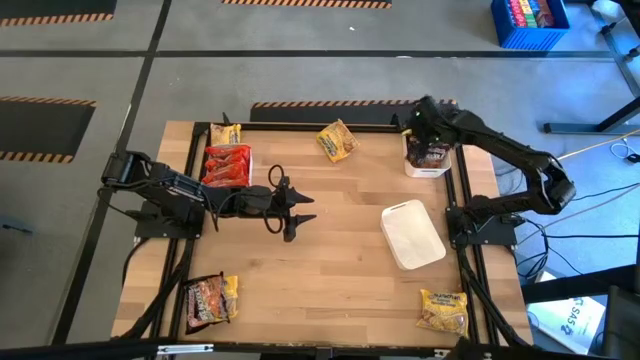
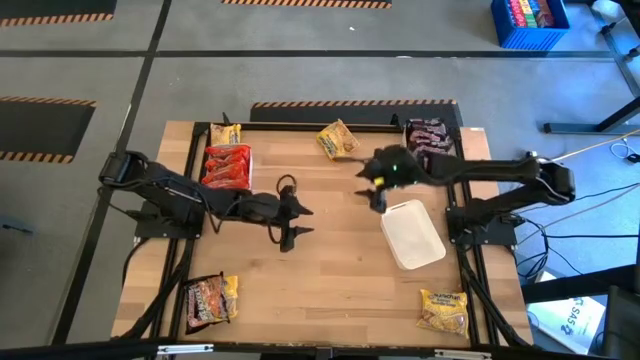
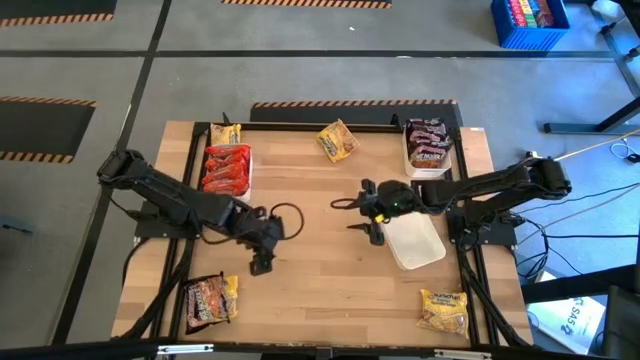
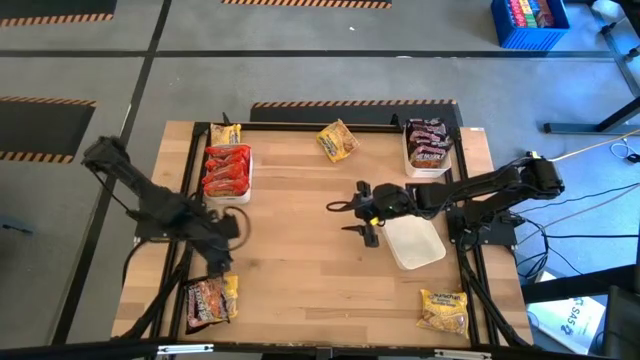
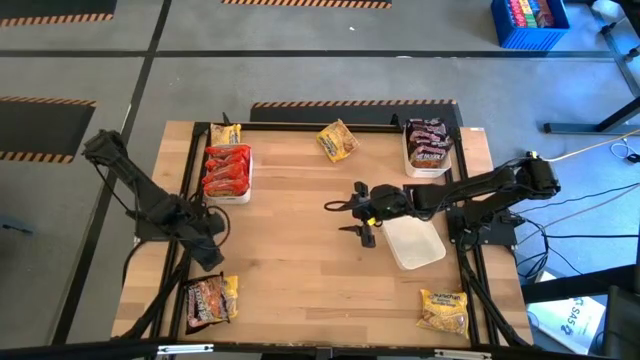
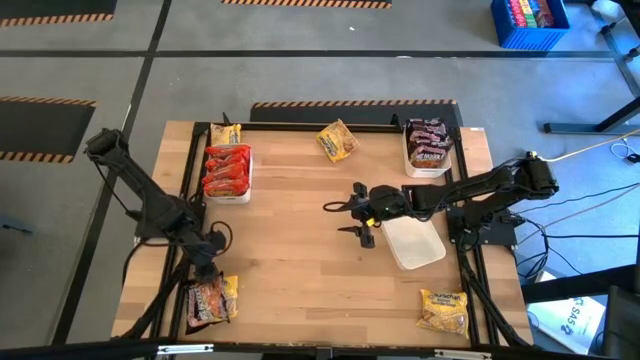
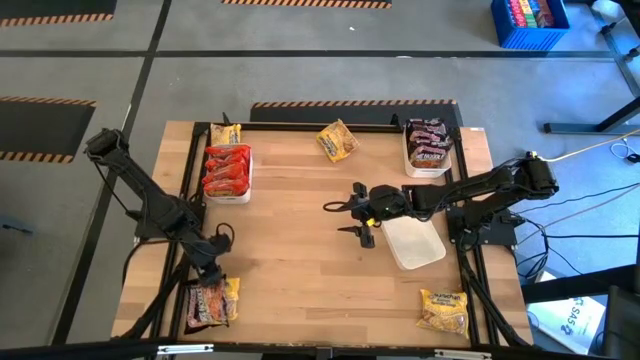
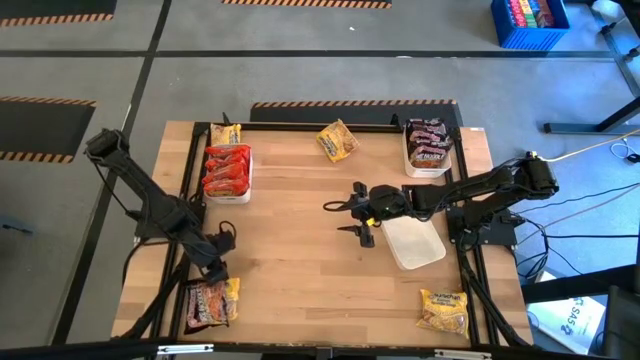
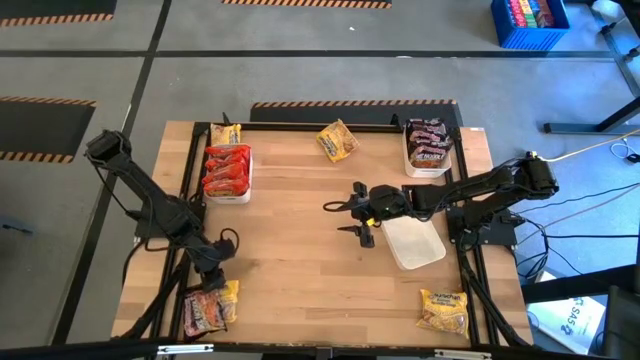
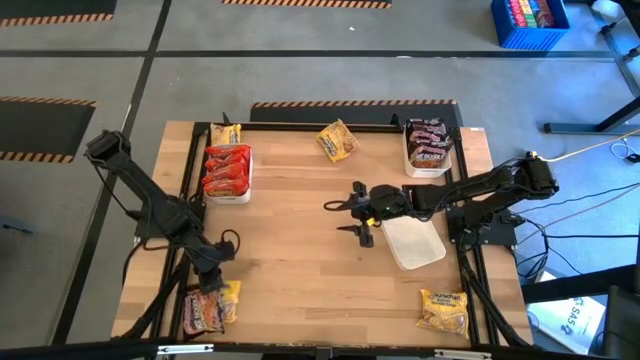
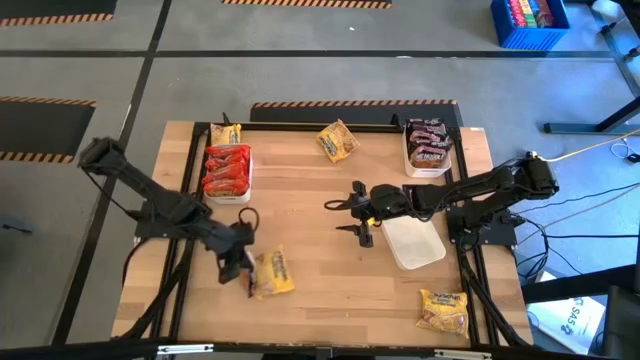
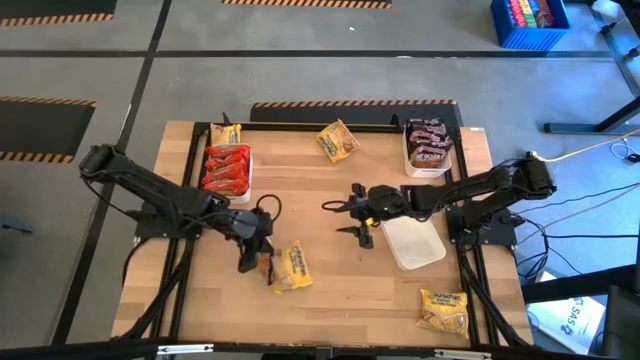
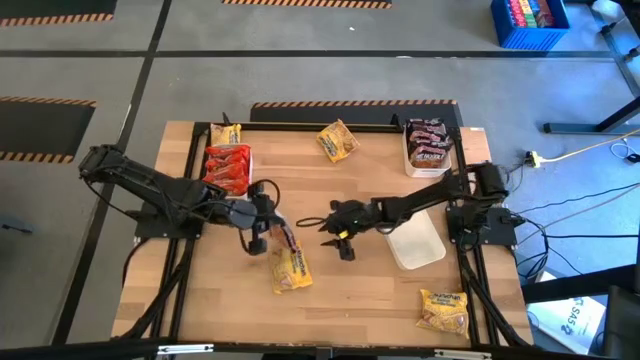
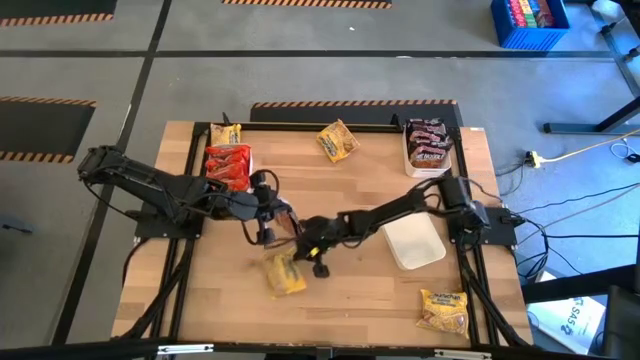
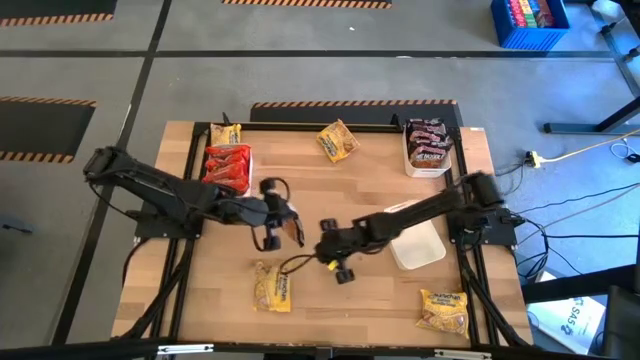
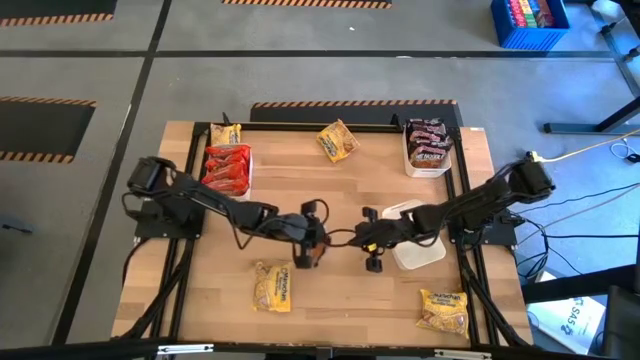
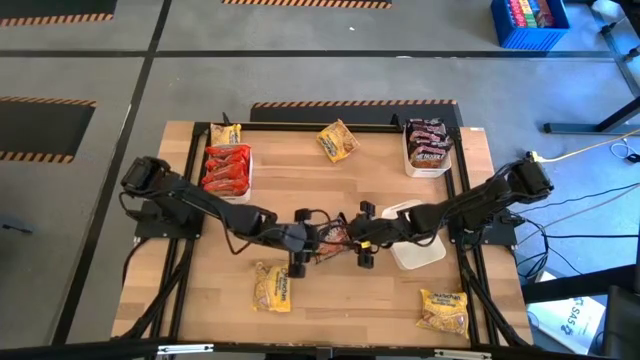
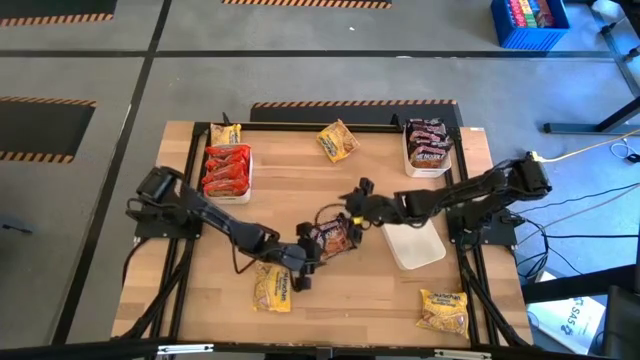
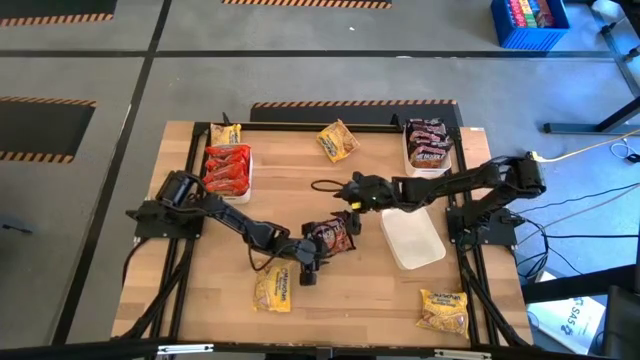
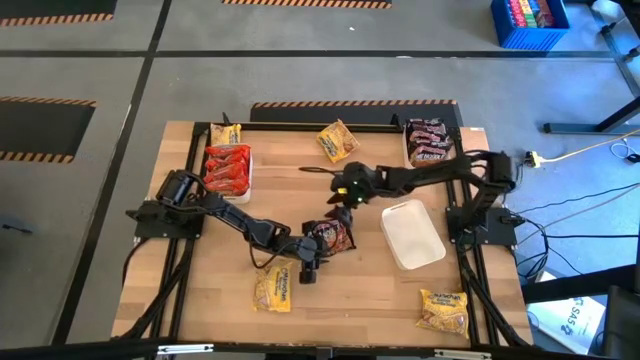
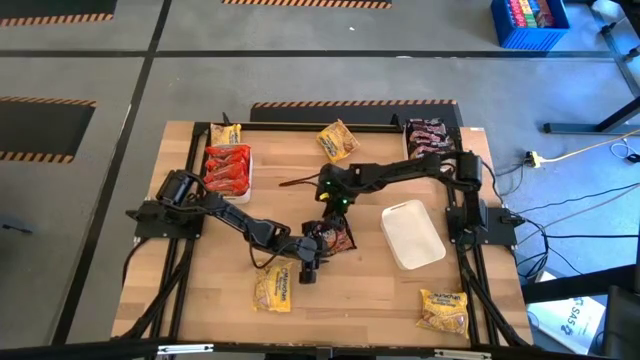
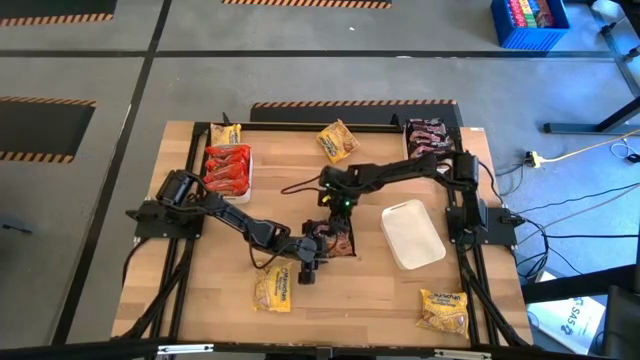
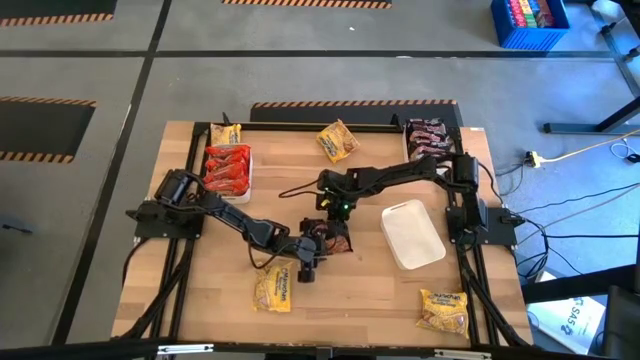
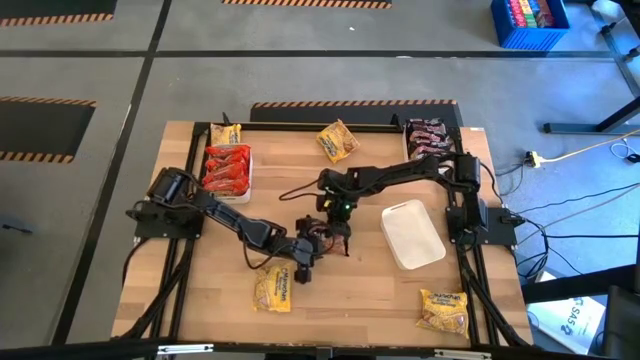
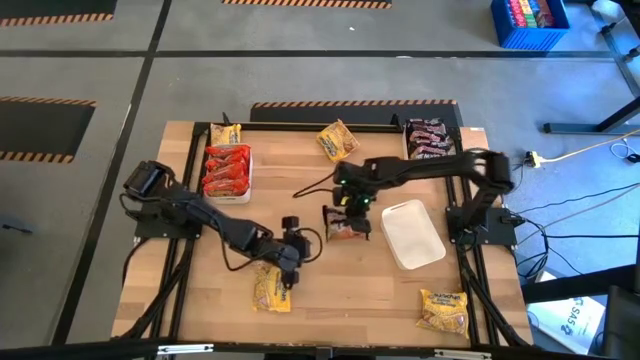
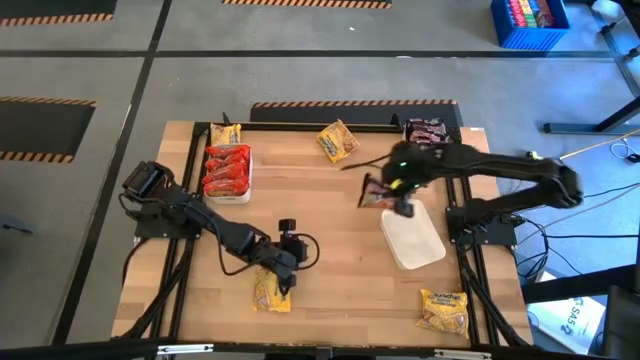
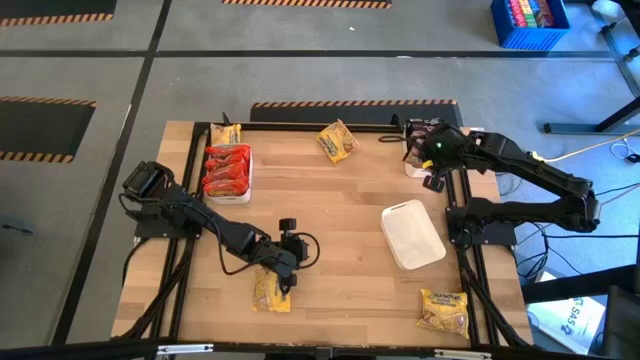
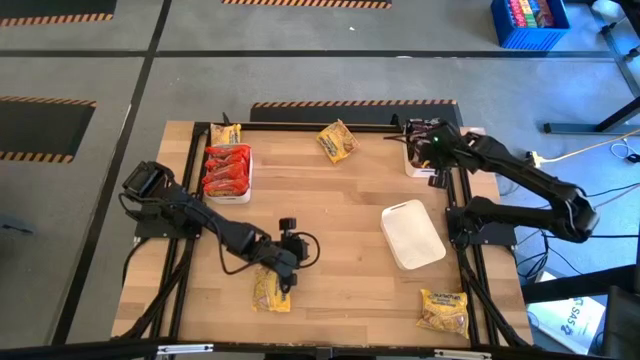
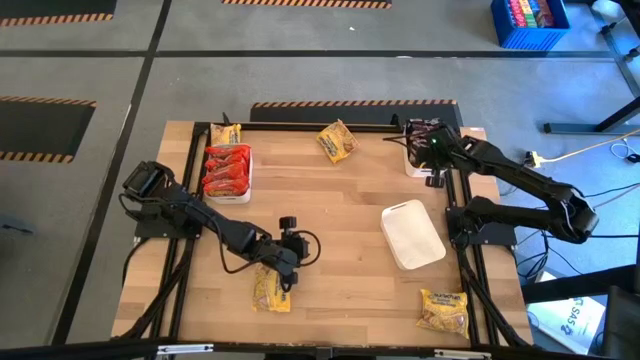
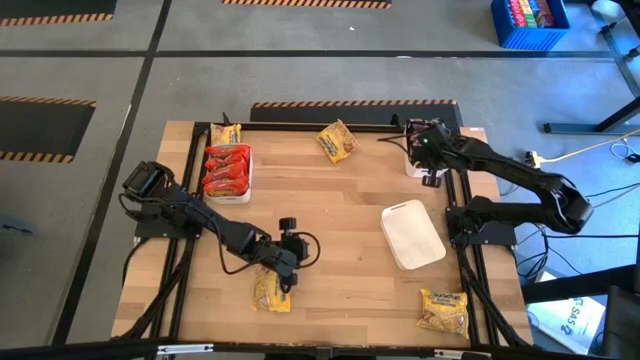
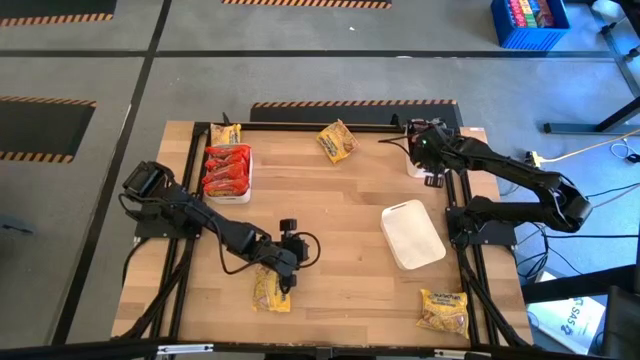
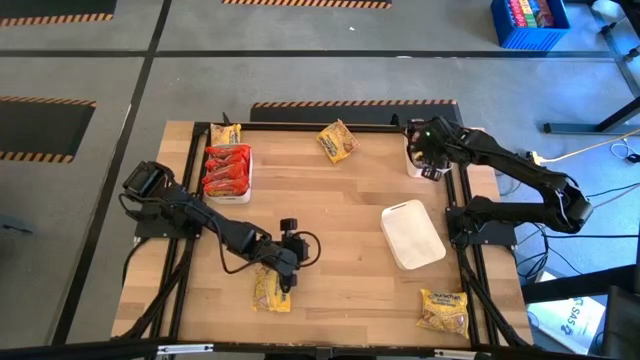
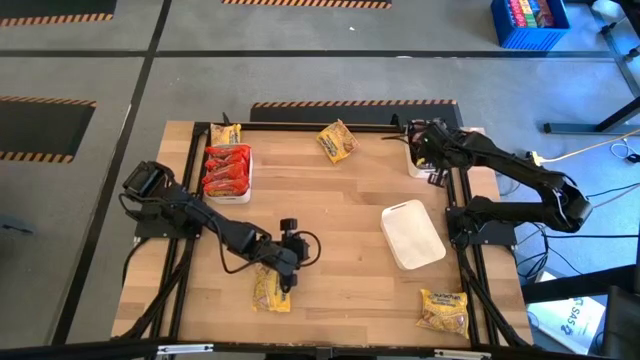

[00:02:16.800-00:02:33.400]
Task: Sort Maruchan noodles
Put the black noodle into the top right white bin

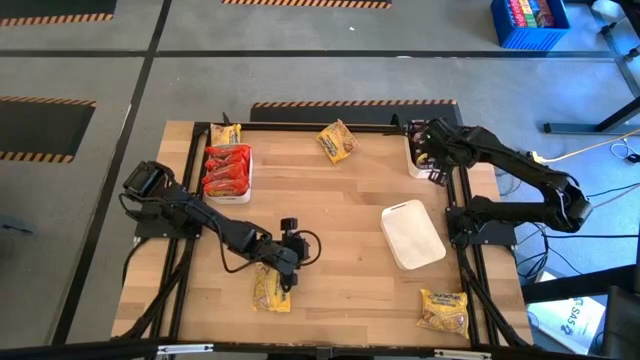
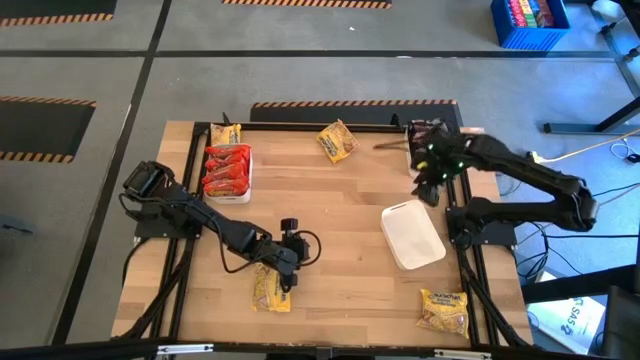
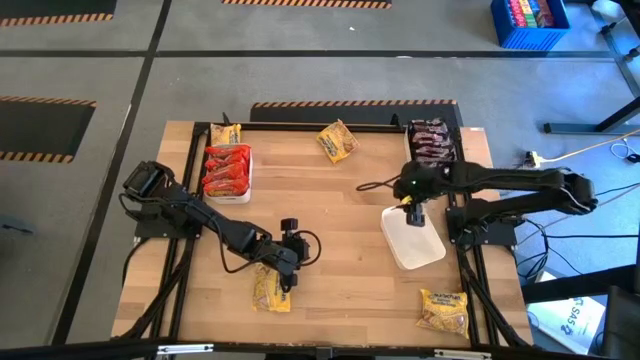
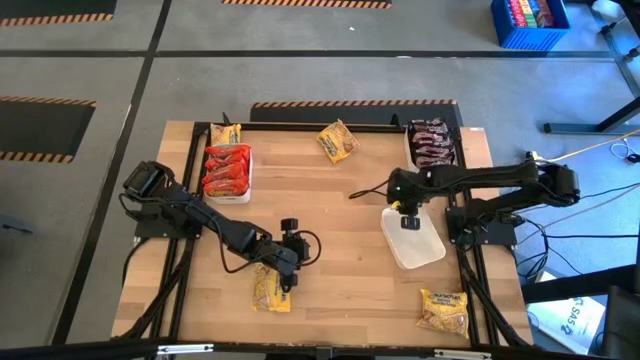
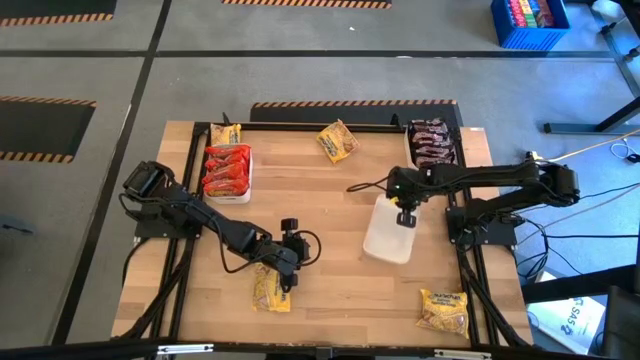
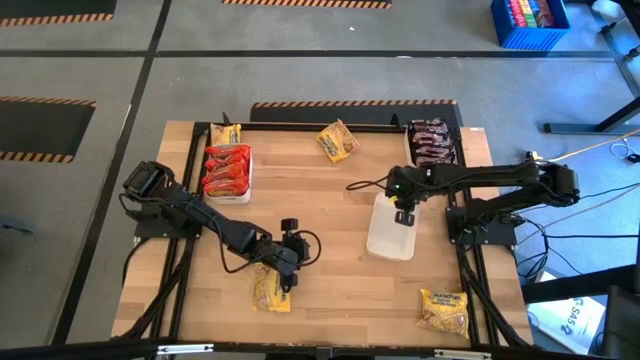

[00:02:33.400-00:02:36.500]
Adjust the white bin

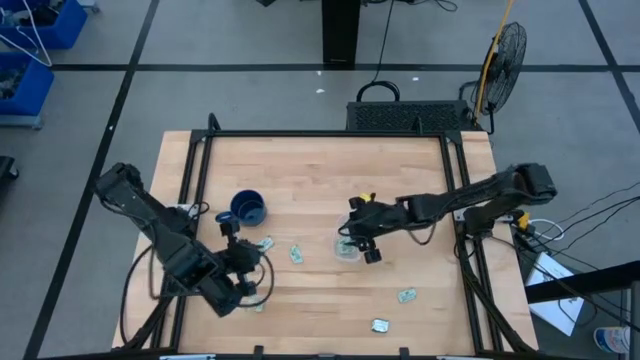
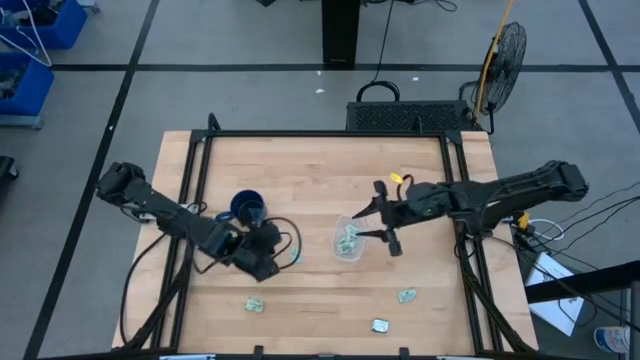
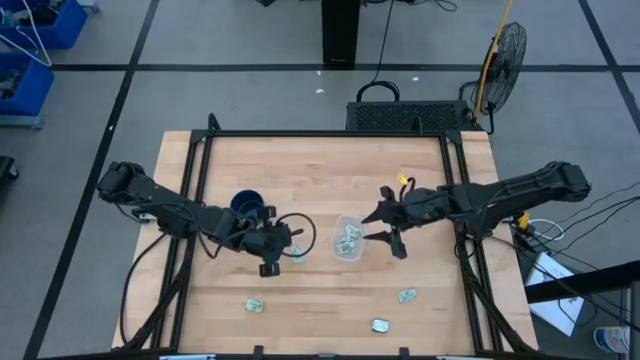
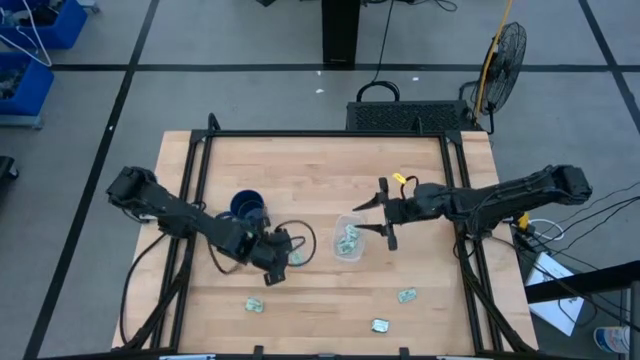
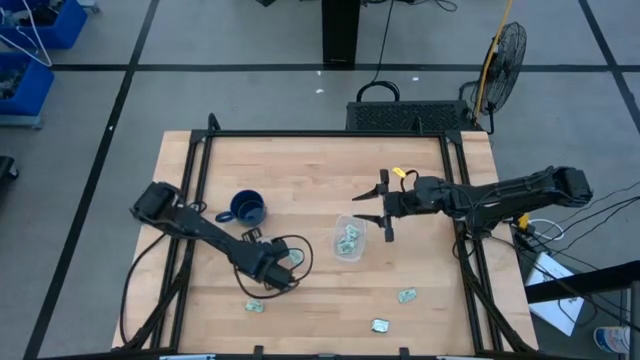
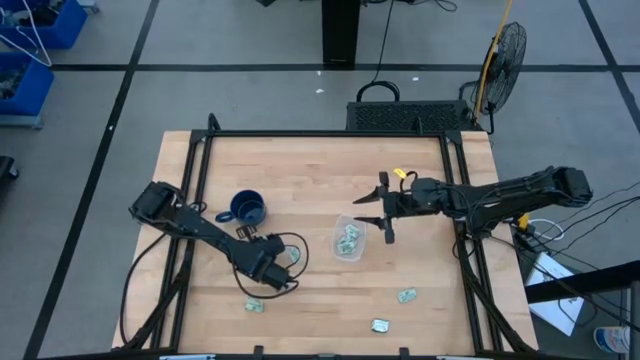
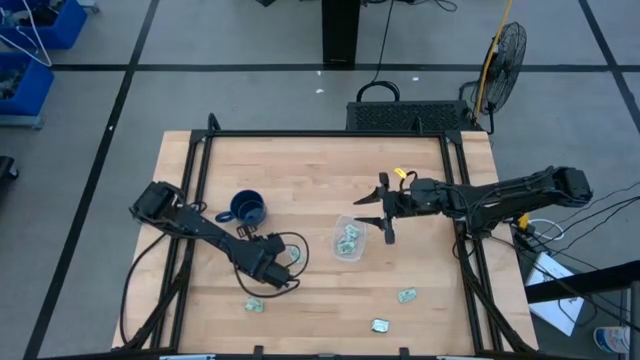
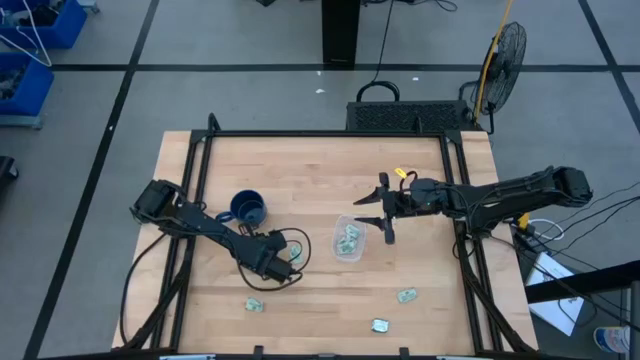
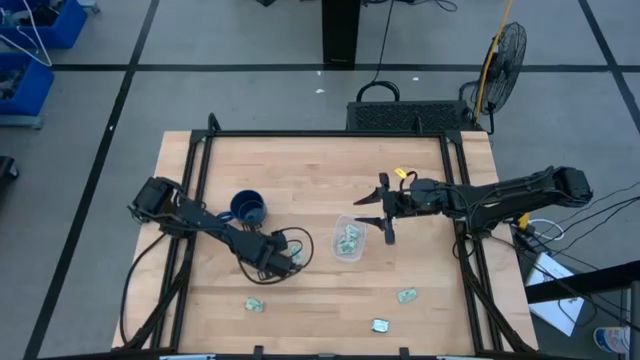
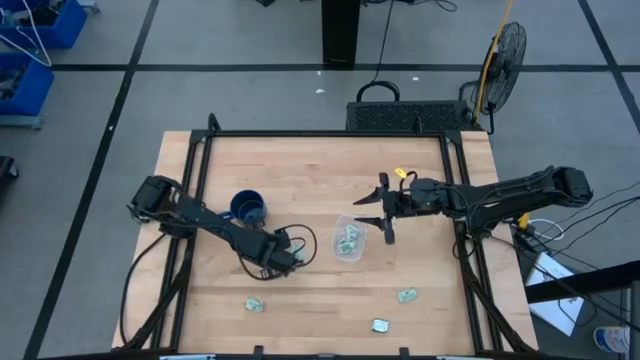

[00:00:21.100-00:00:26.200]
Task: Pick and place Stevia / Truvia into bins
Put the stevia packet into the transparent container
